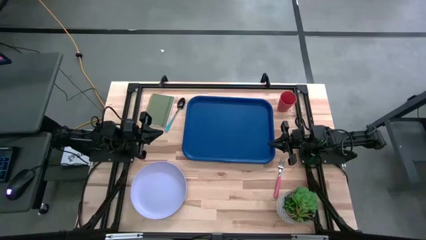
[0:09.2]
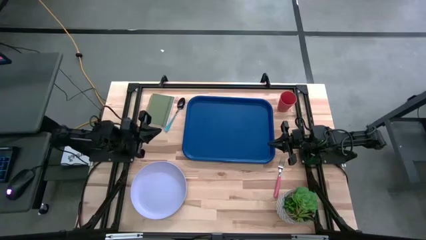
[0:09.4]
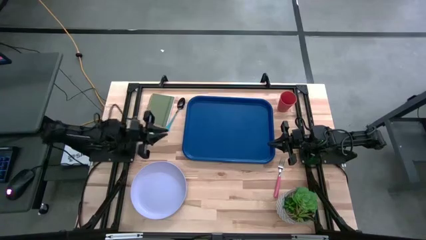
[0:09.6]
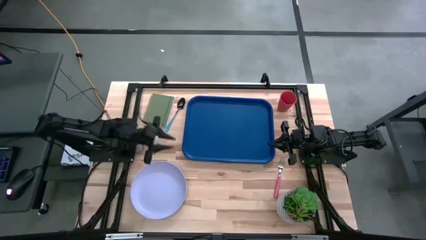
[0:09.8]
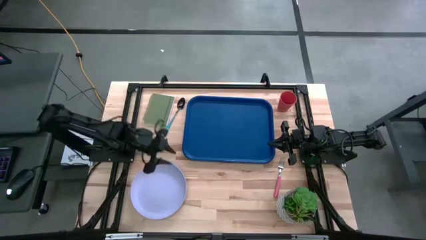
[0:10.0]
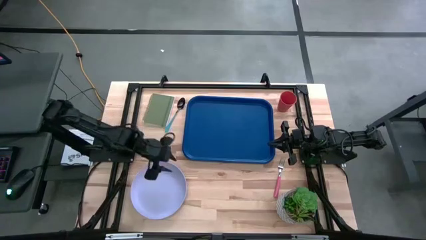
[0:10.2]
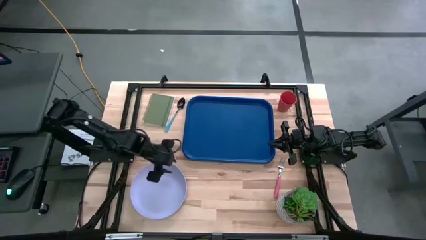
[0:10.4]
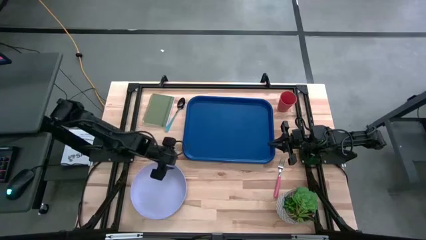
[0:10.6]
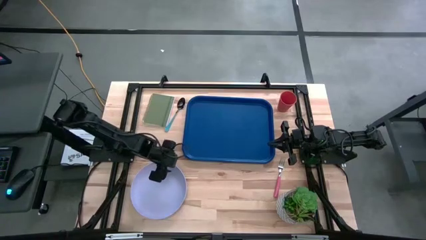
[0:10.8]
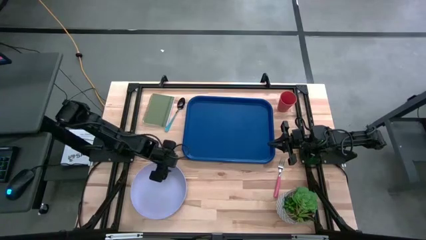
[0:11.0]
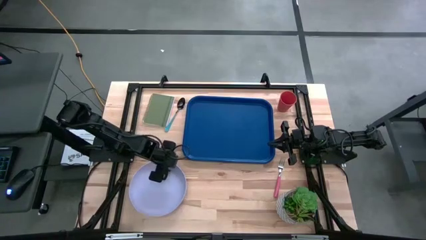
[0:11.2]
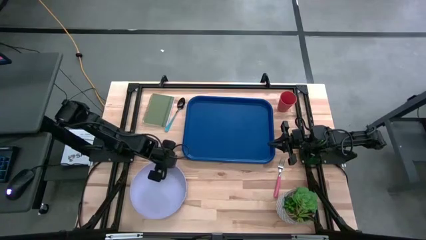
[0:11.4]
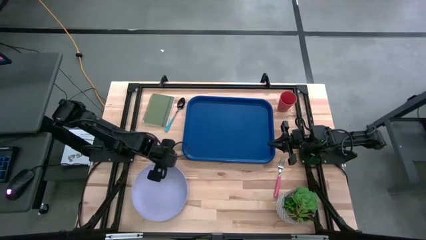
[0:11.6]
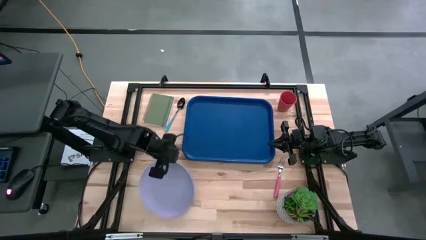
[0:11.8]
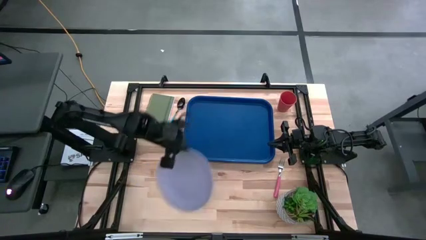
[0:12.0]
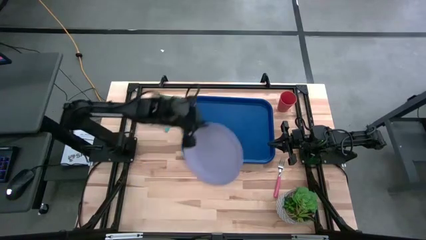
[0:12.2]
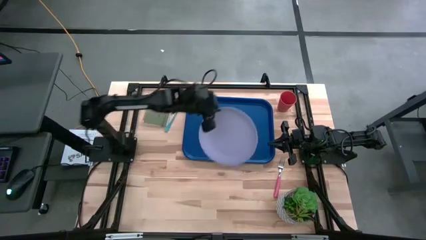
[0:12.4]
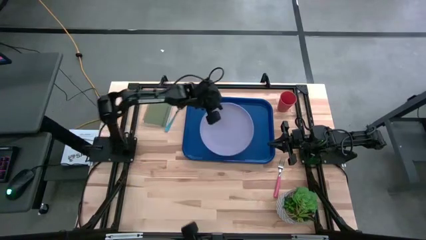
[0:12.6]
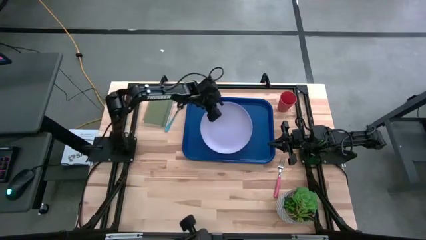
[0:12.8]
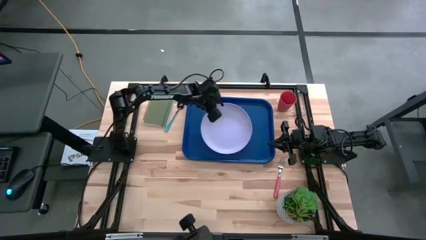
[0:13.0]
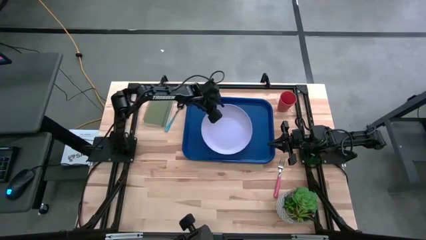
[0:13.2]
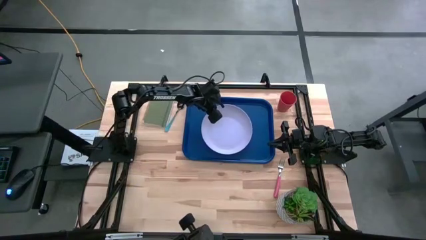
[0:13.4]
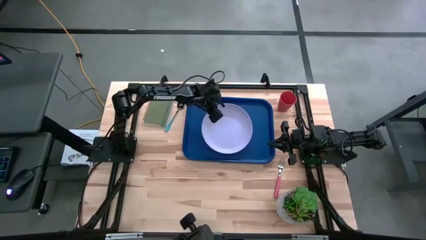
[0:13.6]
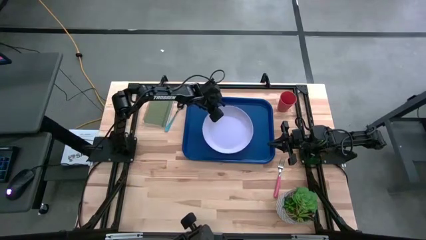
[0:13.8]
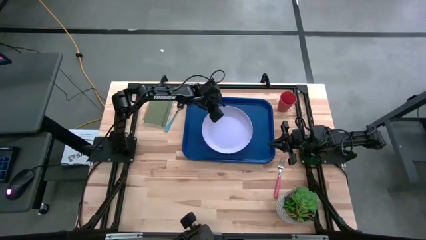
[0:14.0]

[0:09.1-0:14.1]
Task: Pick and place plate/cup/fork/spoon on tray
Put the white plate on the middle of the blue serving tray

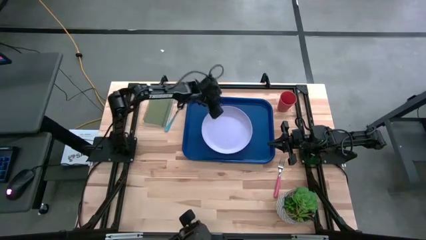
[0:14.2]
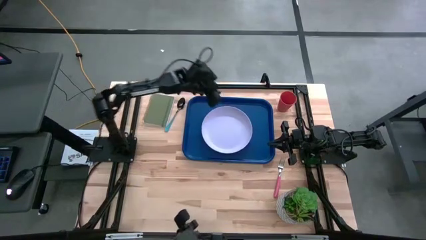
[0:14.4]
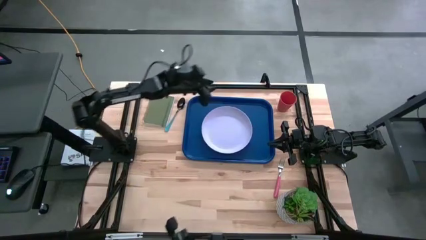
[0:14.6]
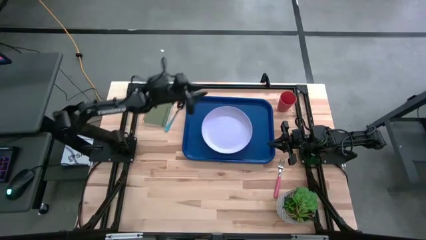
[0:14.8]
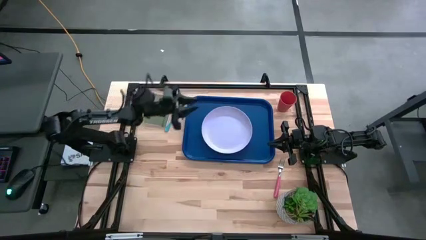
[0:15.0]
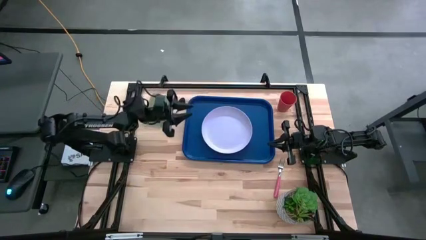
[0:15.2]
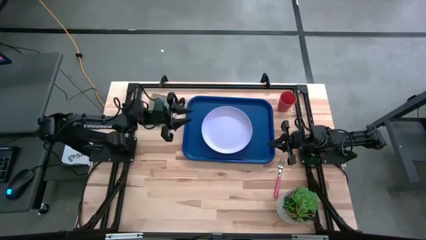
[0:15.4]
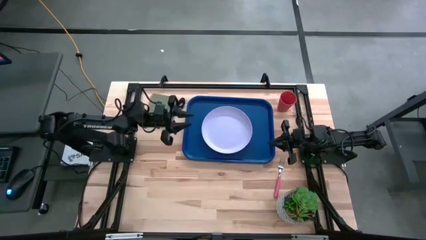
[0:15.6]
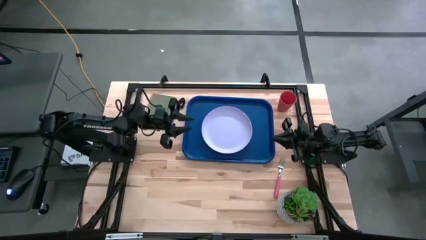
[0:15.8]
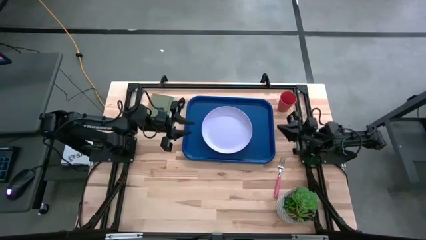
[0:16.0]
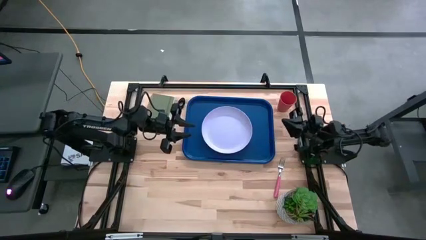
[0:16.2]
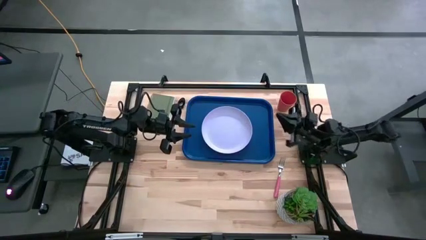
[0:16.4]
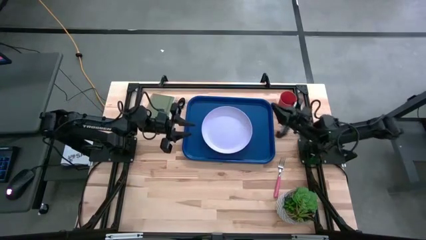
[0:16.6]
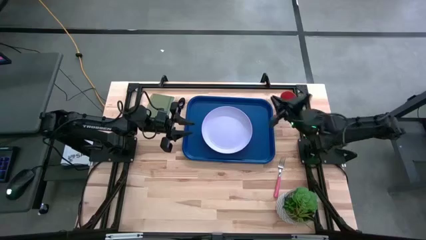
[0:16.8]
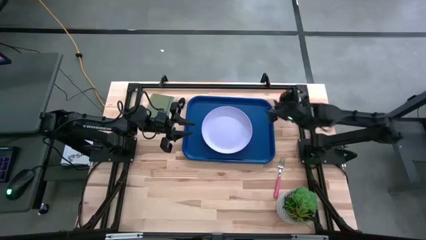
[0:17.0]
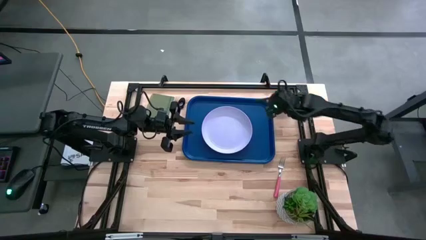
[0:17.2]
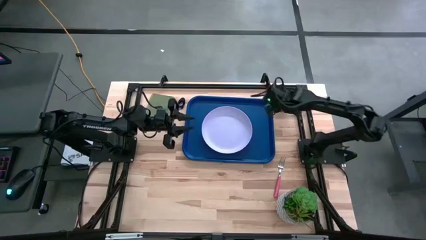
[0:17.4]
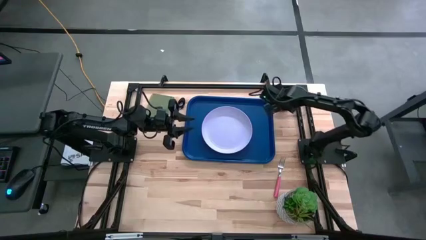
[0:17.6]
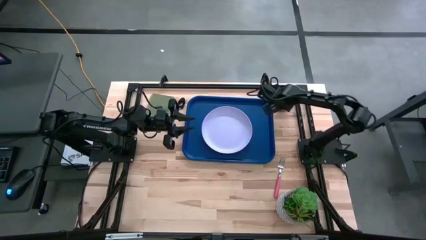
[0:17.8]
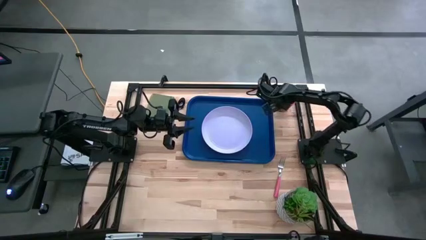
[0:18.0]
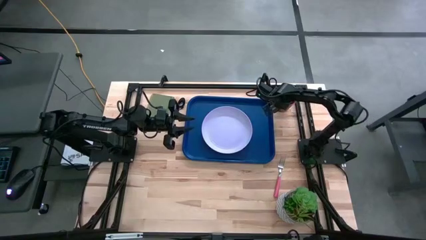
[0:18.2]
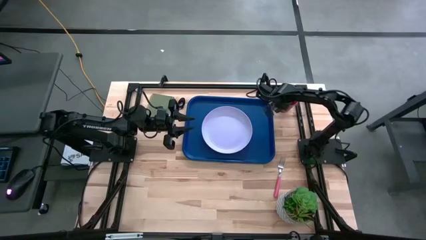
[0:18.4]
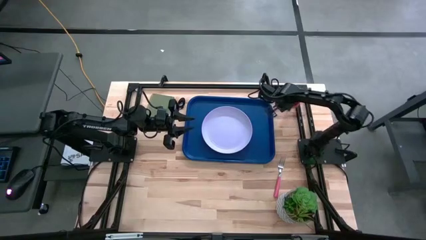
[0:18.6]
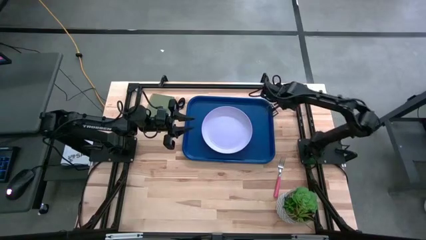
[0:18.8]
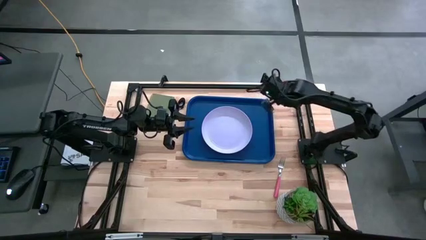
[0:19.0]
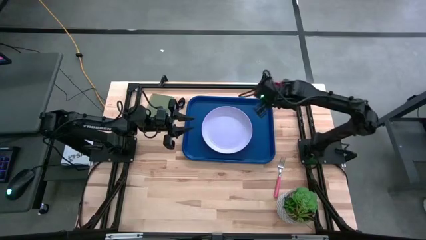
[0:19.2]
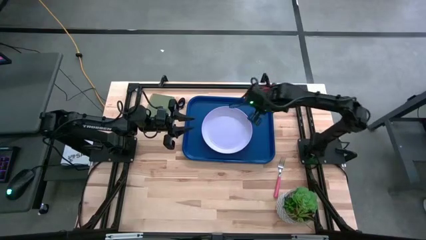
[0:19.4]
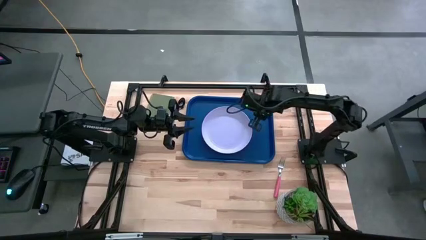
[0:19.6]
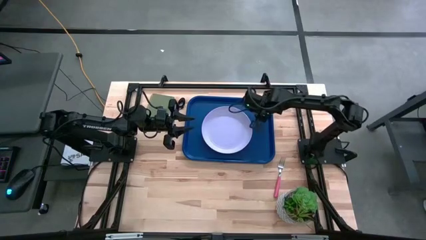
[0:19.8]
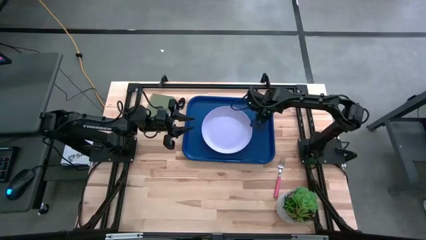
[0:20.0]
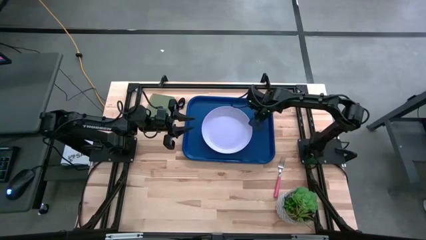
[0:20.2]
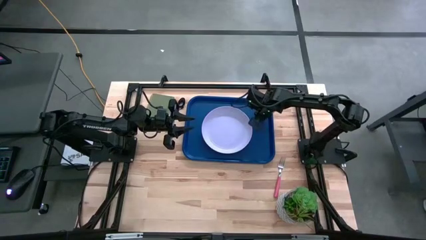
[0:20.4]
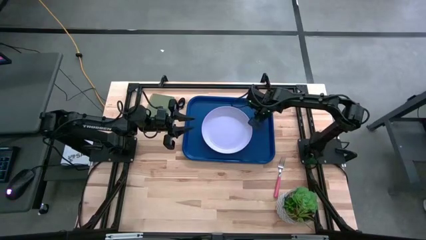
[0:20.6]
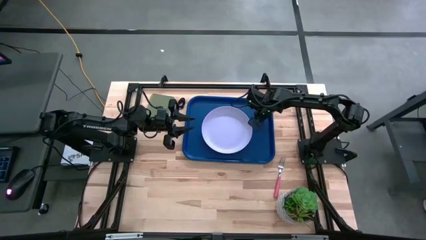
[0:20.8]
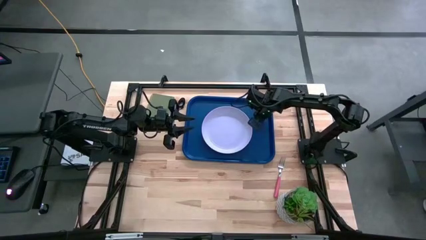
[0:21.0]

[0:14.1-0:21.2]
Put the orange cup on the blue serving tray to the top right of the white plate

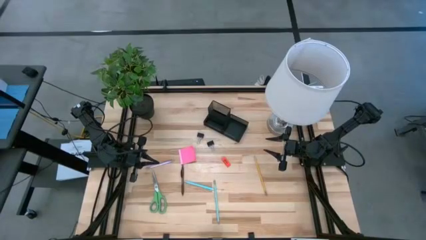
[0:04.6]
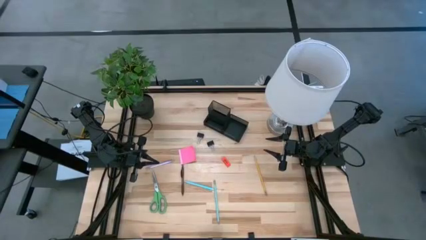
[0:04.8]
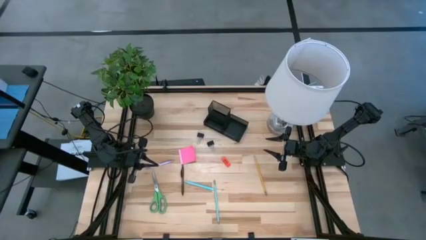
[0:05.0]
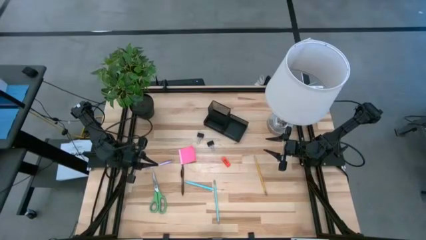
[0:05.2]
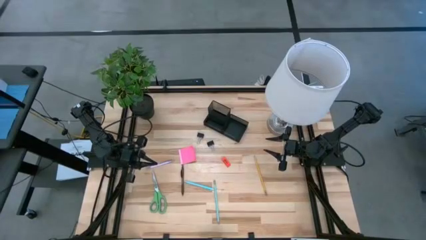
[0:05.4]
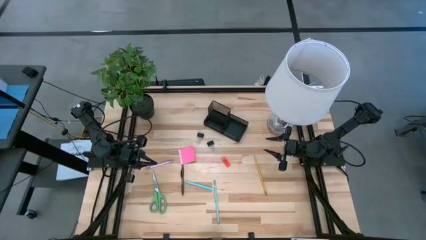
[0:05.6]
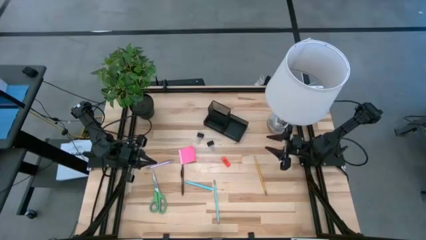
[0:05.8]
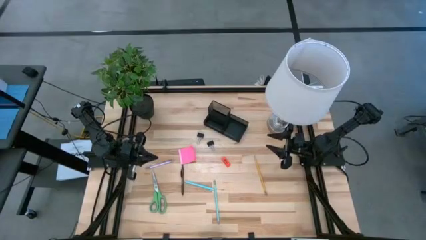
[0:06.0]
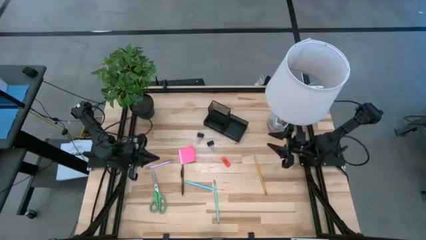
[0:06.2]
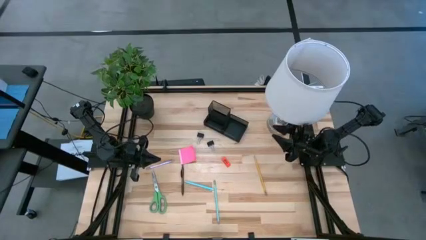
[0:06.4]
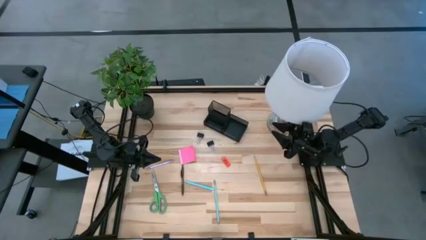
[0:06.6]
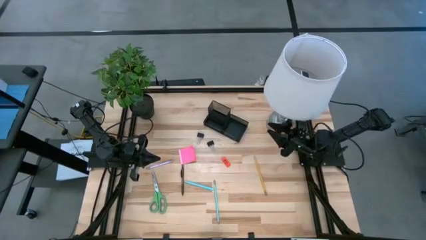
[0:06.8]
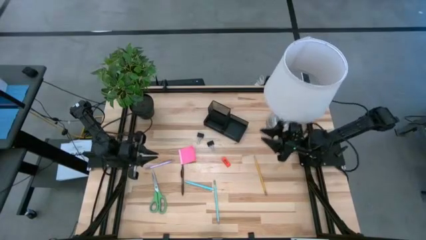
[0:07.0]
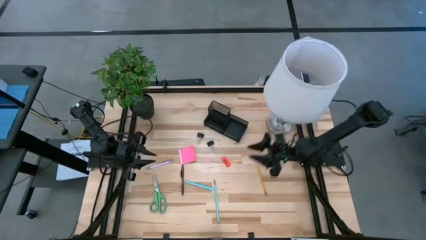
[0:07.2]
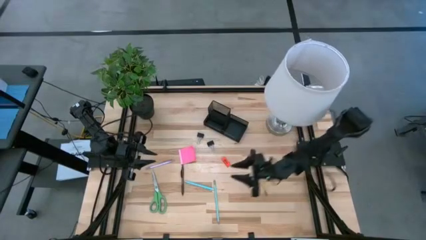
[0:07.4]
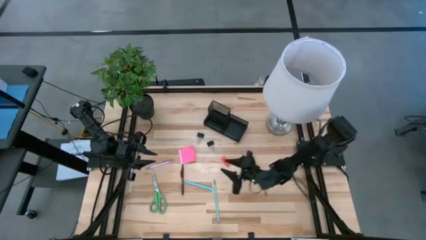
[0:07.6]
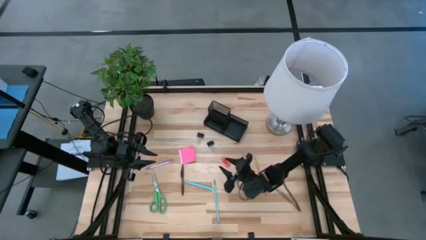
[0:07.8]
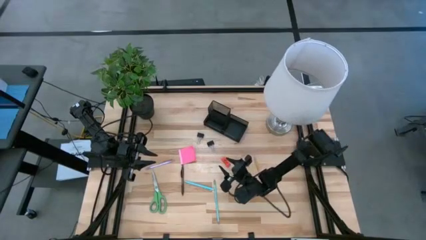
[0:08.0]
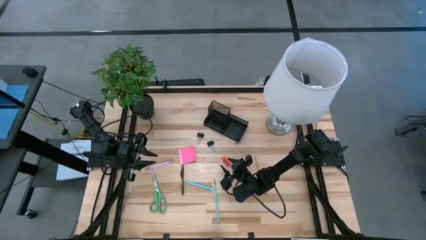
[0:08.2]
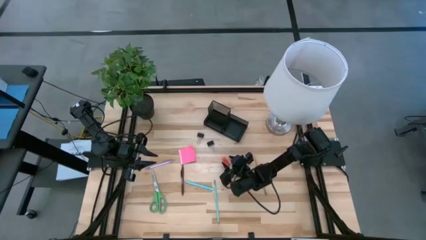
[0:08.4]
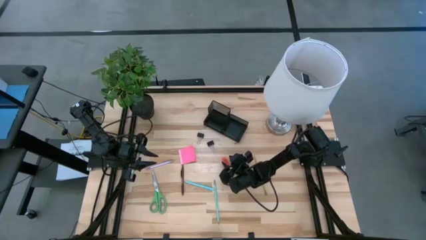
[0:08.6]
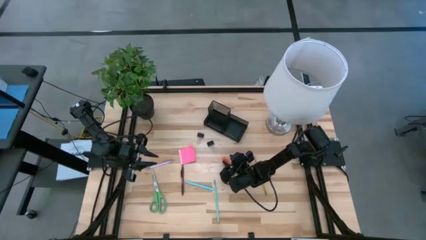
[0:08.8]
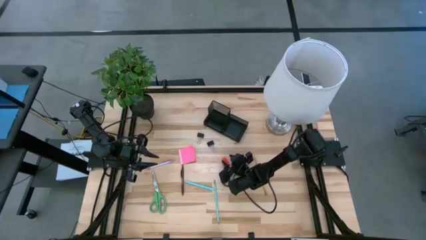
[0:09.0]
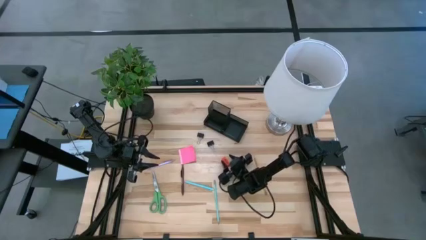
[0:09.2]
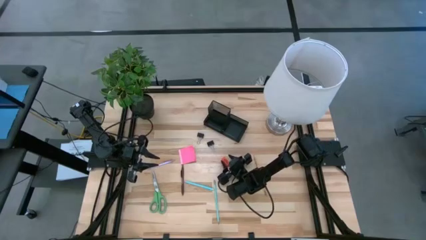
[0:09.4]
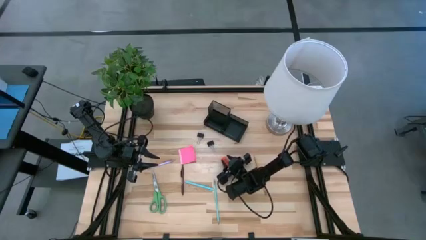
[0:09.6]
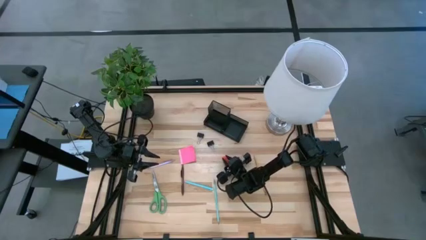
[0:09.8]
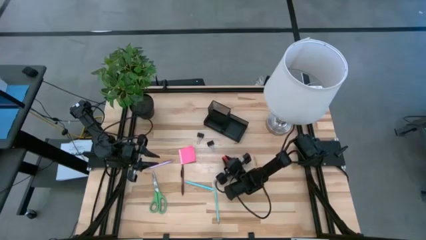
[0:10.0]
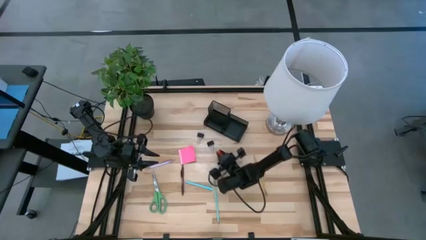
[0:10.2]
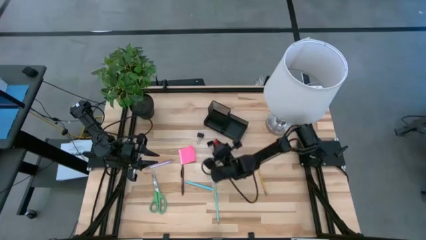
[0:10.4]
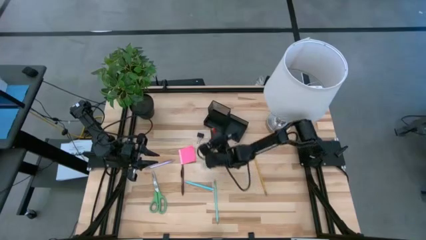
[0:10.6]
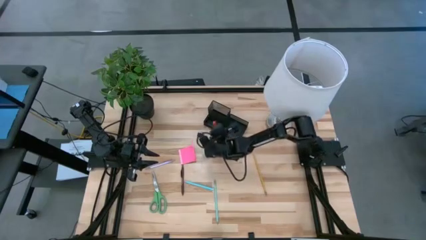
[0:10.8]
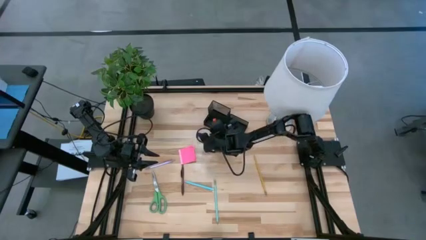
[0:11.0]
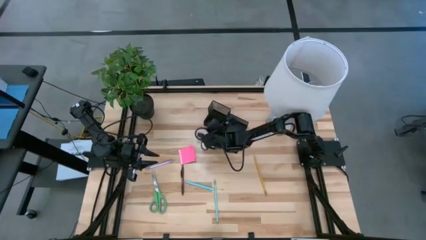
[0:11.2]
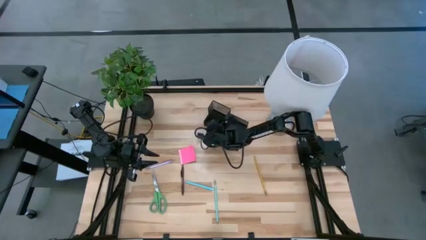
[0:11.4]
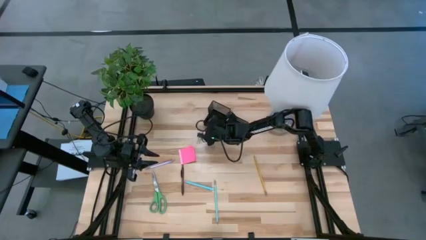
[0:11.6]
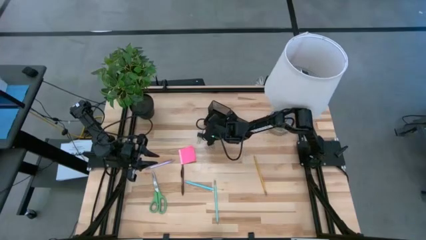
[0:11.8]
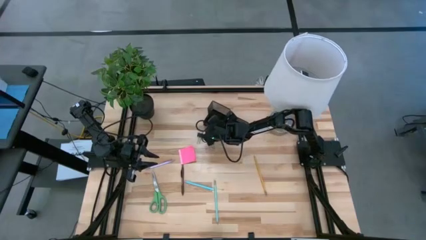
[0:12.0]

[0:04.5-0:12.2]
Task: Pick and place office supplies into organizer
Put the orange eraser into the desk organizer
